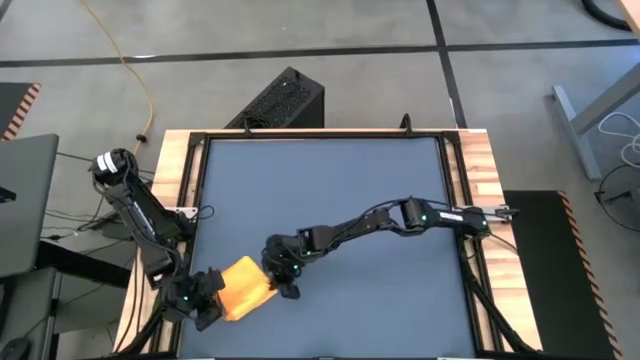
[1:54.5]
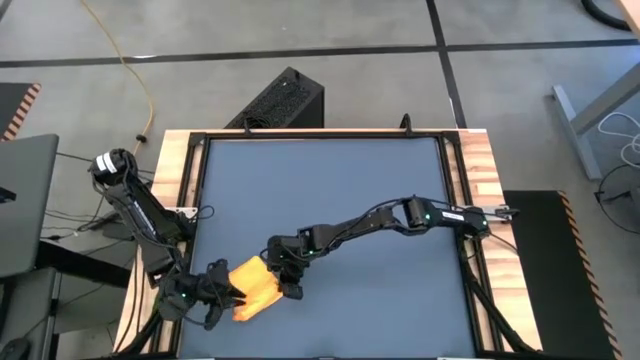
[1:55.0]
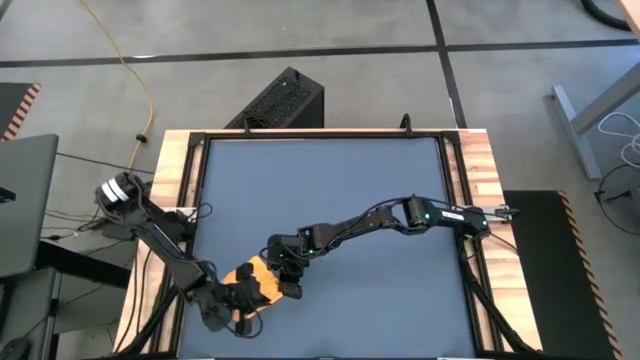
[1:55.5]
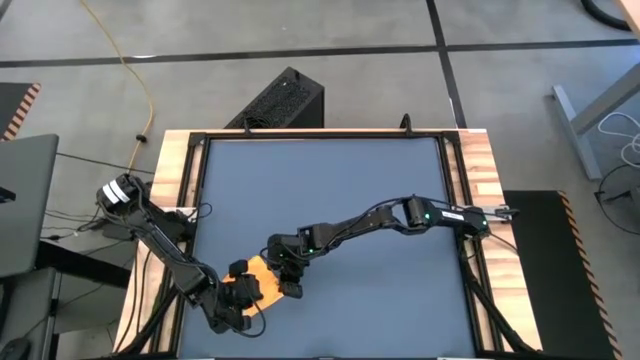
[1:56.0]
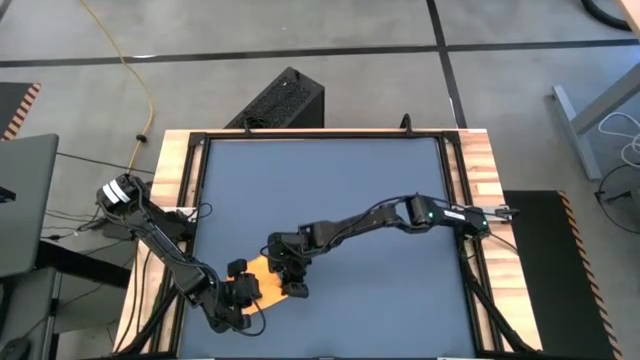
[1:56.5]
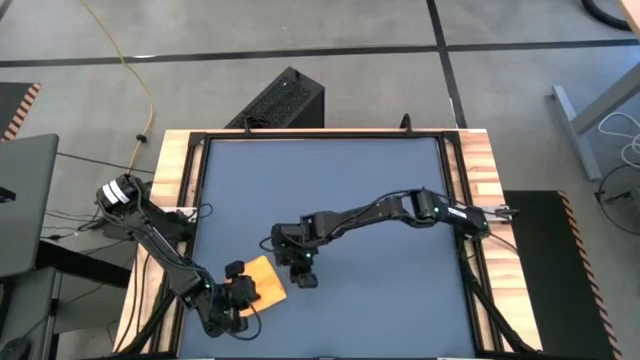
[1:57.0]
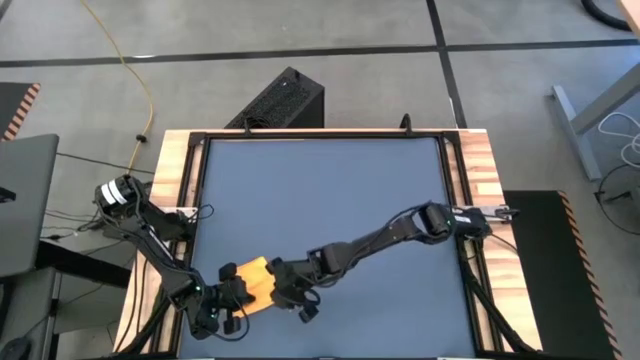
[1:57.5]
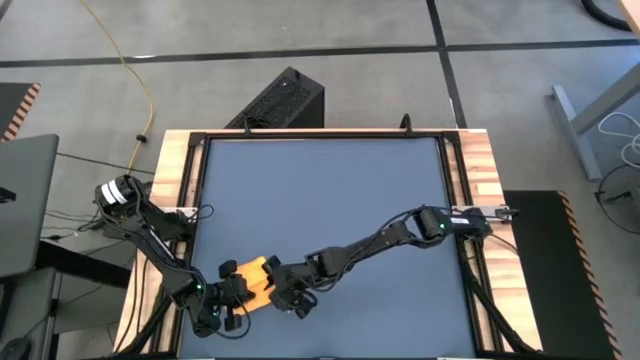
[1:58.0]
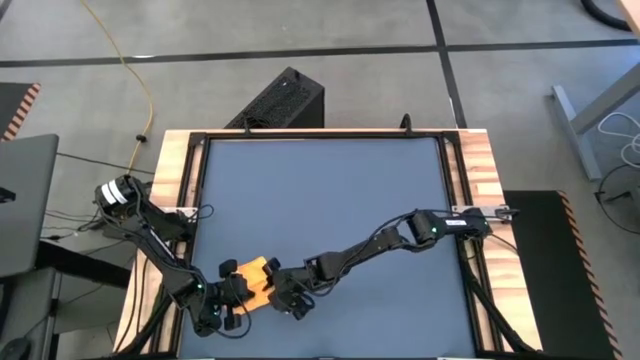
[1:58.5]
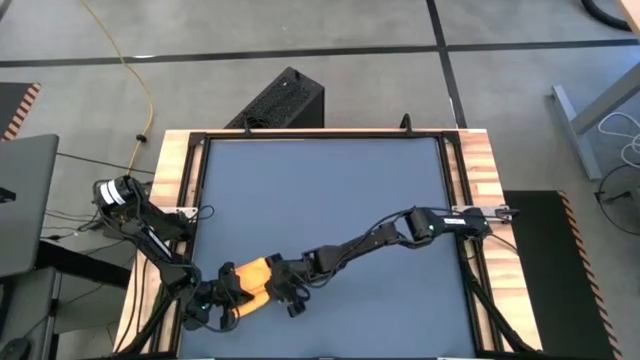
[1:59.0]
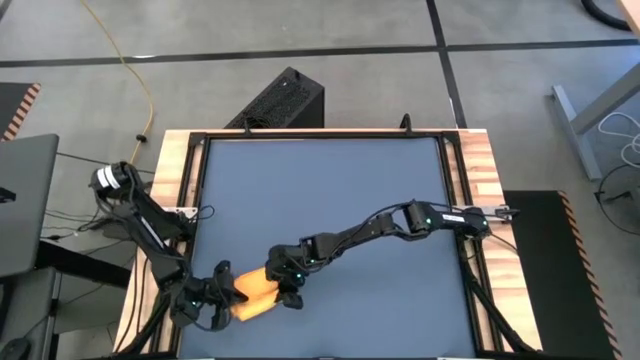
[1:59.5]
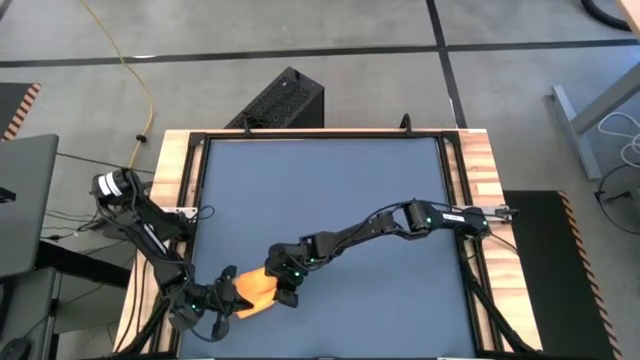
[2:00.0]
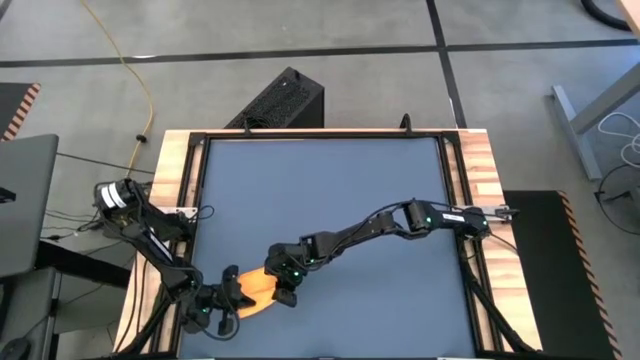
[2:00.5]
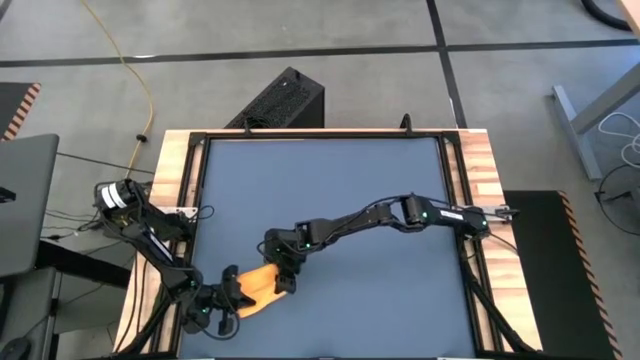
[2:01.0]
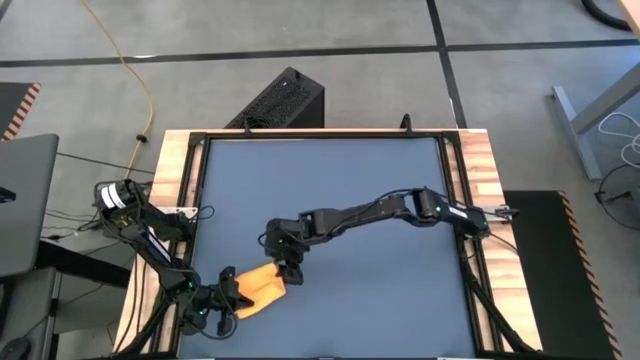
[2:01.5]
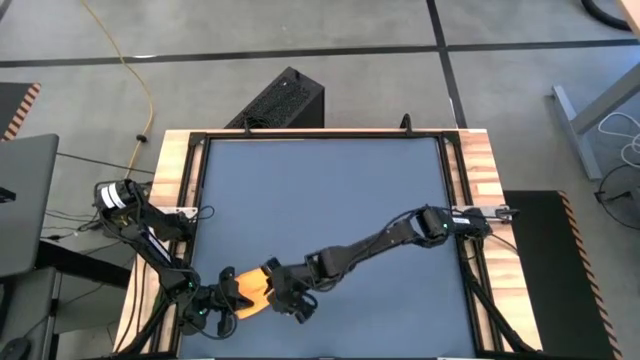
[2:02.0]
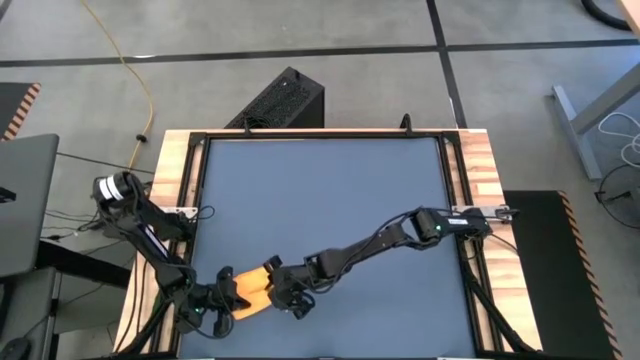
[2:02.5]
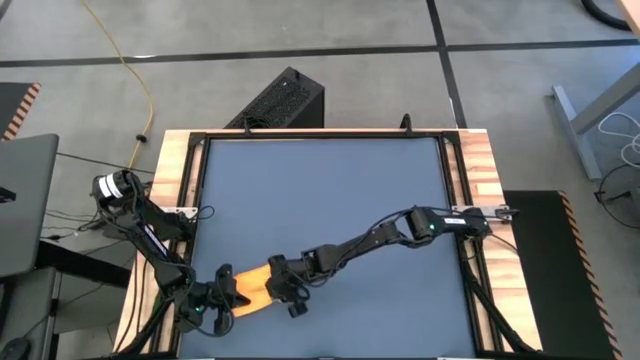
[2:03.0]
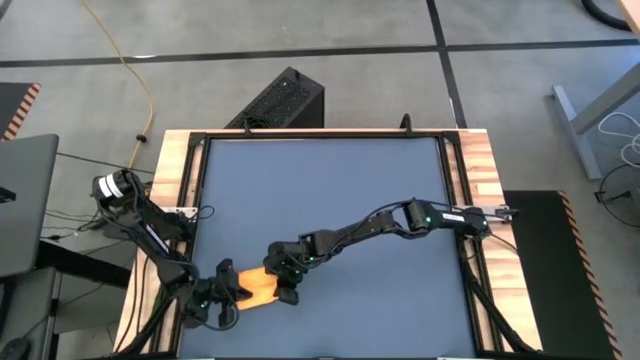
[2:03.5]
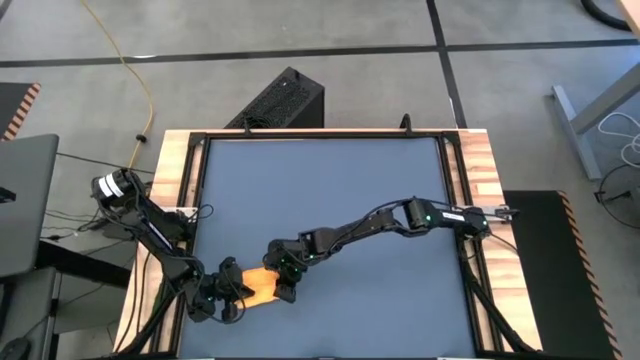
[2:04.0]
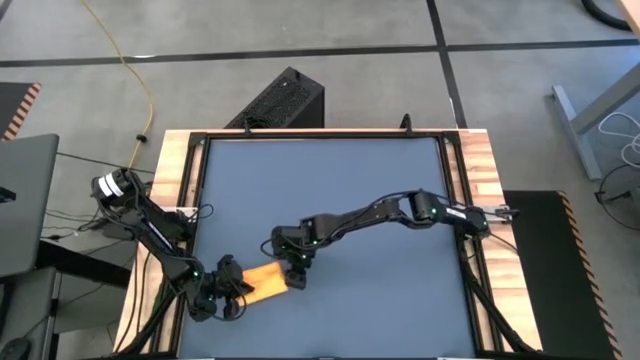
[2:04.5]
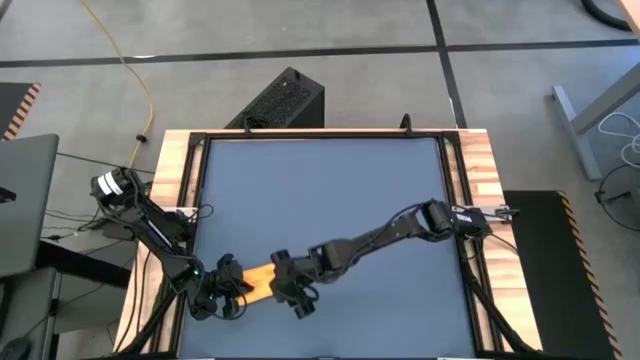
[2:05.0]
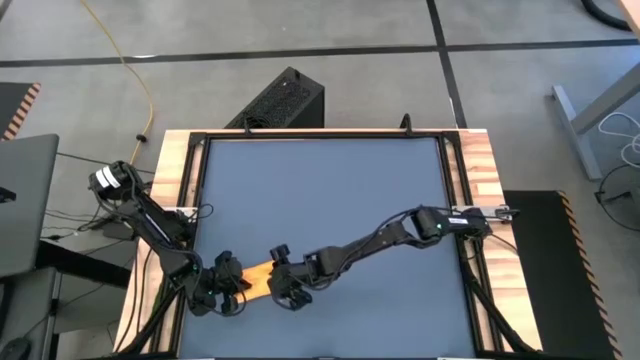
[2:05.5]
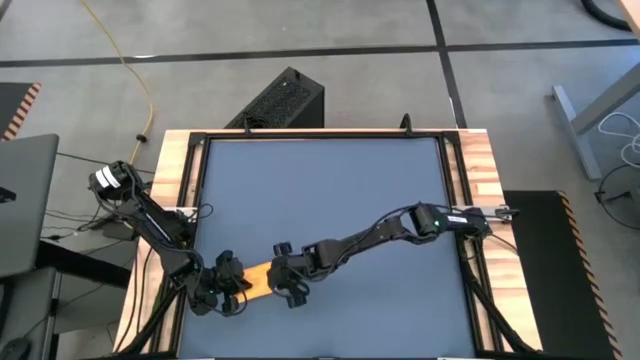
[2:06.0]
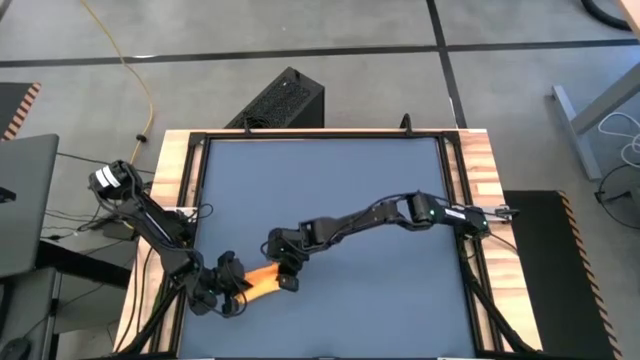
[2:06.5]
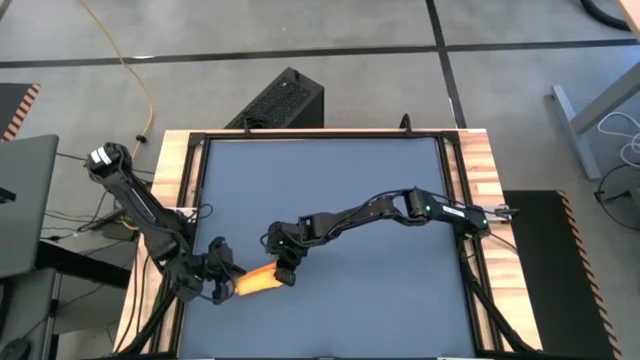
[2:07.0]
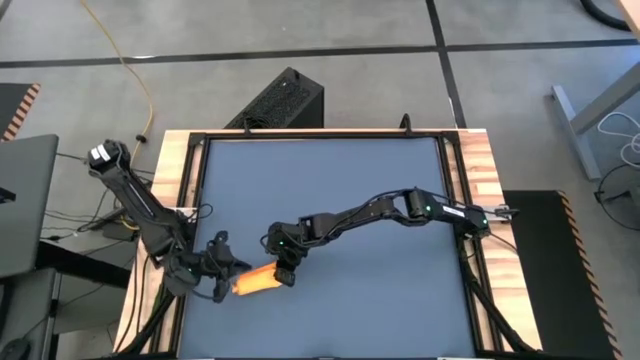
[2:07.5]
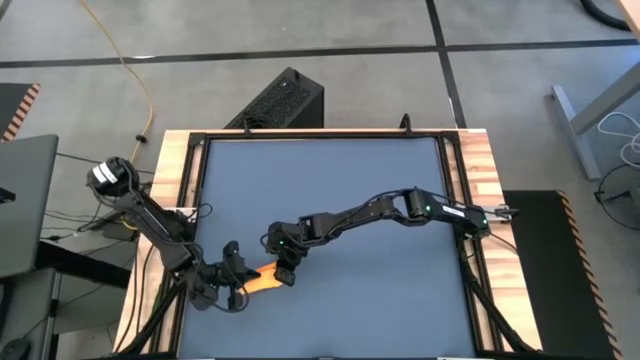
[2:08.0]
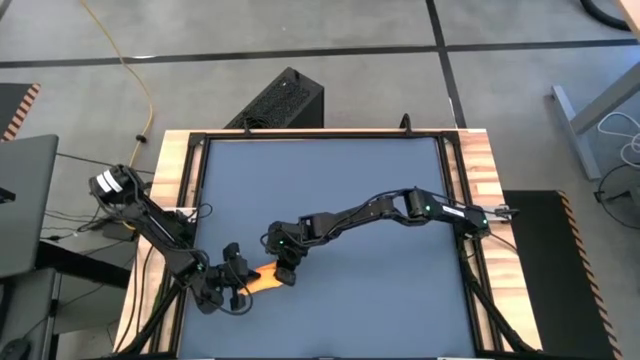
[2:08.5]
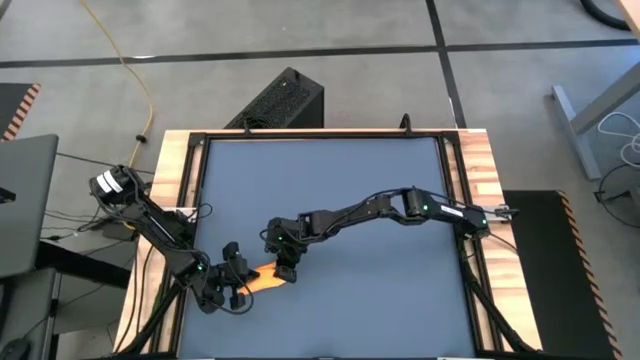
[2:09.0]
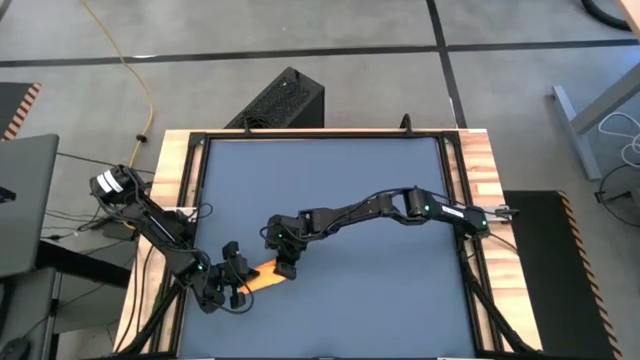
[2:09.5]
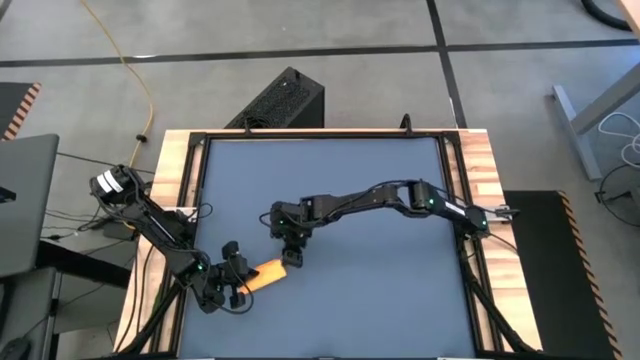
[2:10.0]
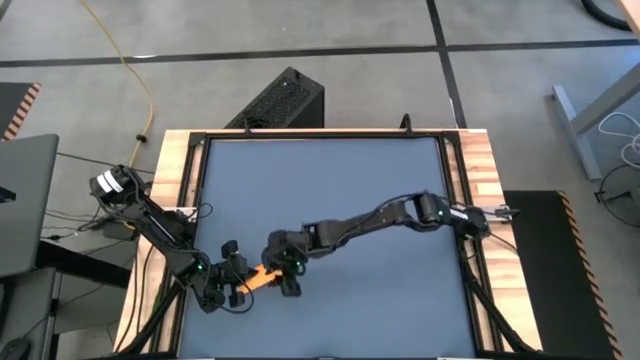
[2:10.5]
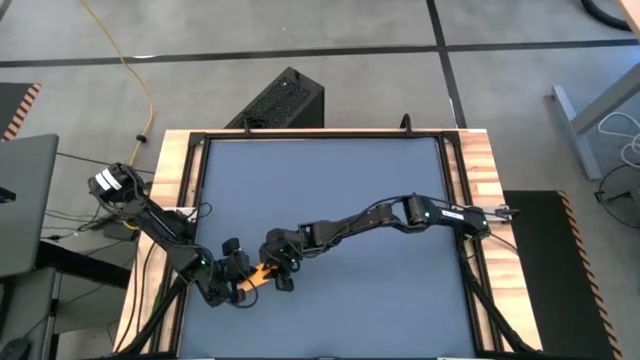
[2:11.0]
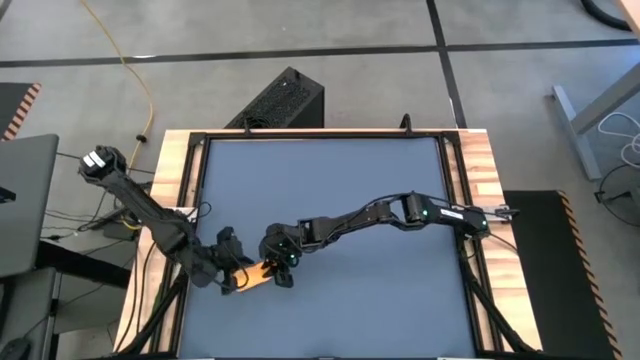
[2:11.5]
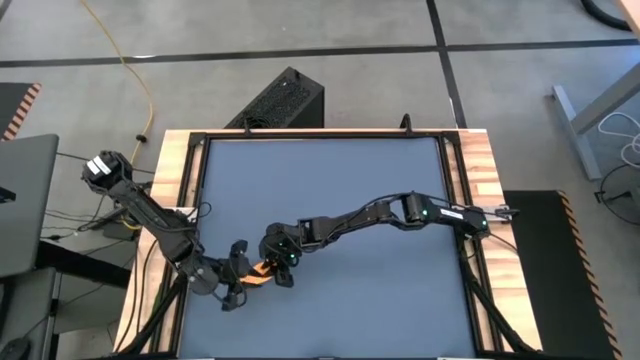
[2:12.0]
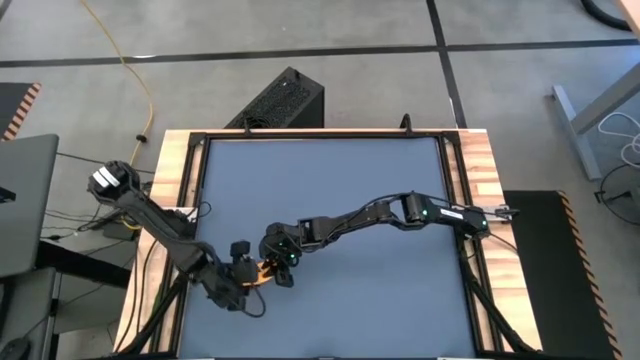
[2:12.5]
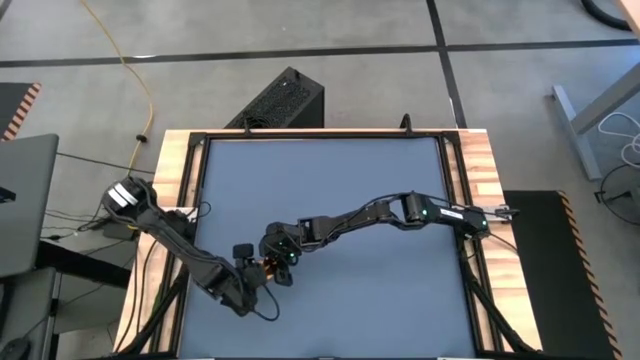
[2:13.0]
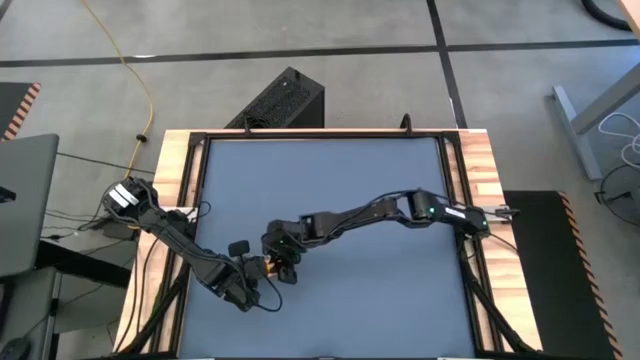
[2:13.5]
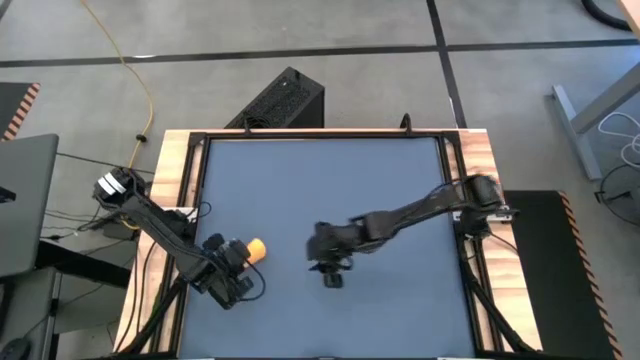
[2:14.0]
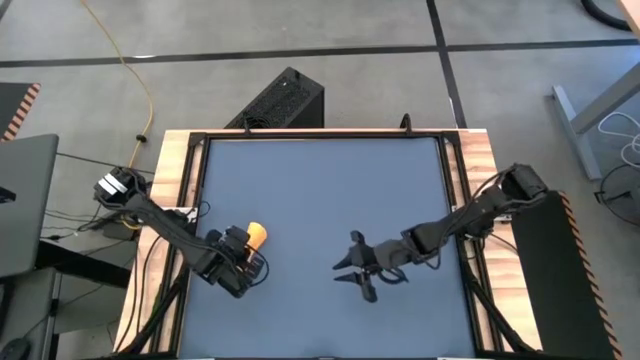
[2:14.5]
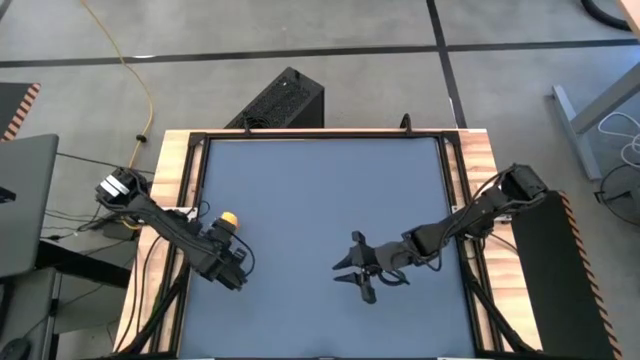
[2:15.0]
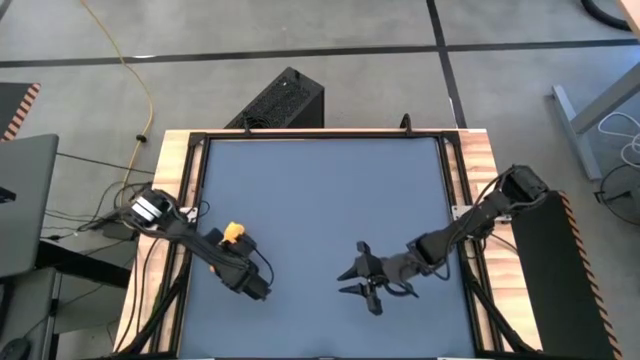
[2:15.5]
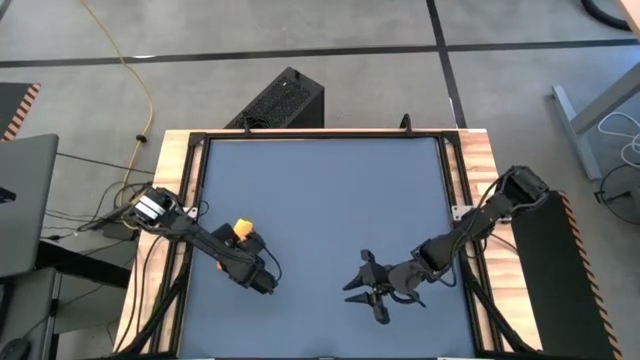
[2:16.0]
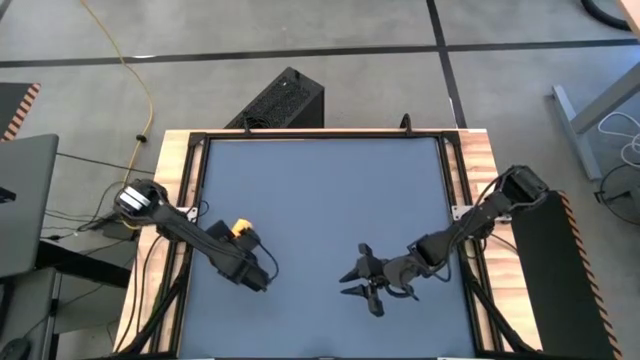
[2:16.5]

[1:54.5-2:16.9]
Task: Roll towel
Roll the orange microfiber towel
